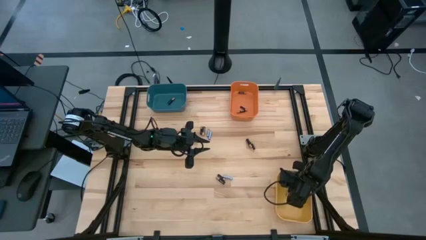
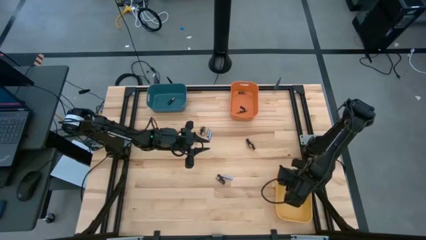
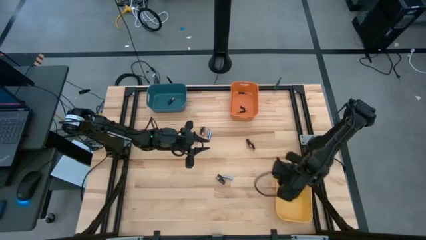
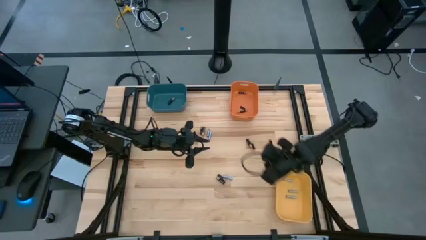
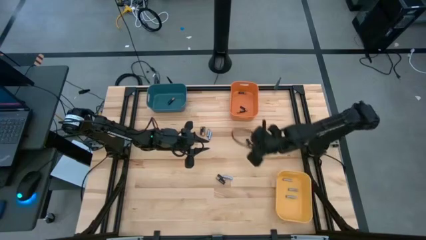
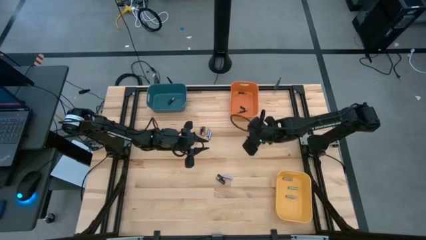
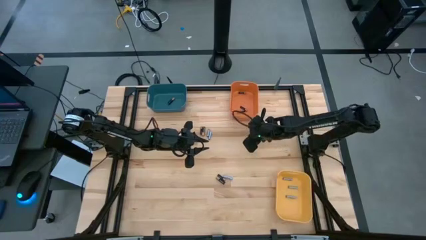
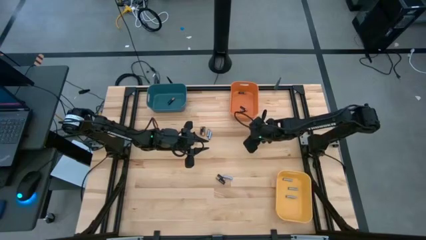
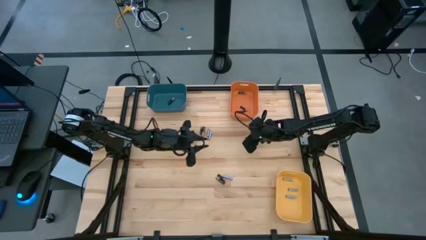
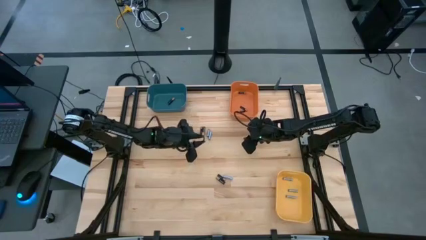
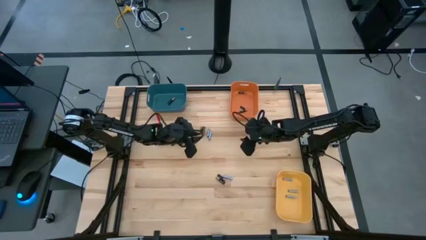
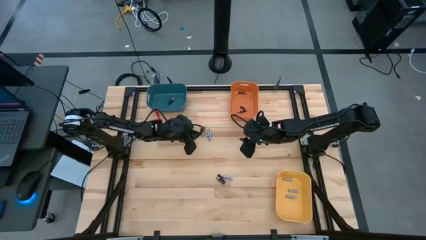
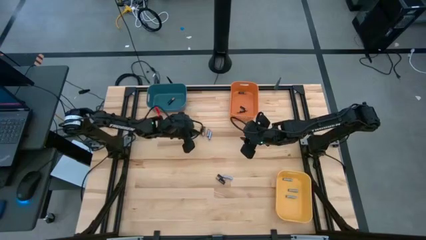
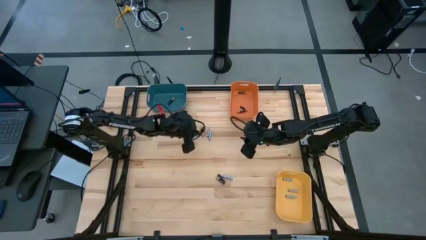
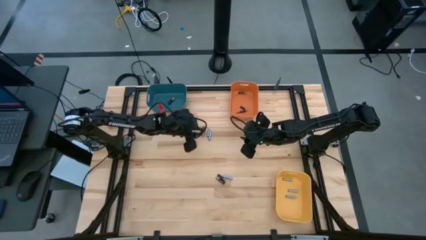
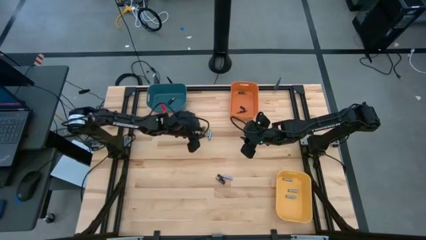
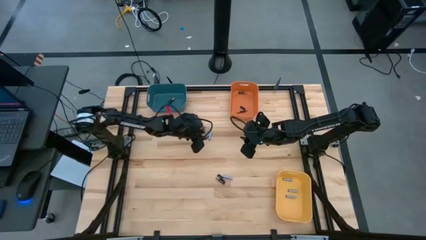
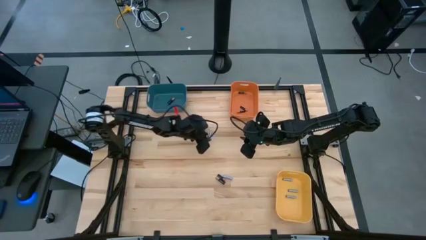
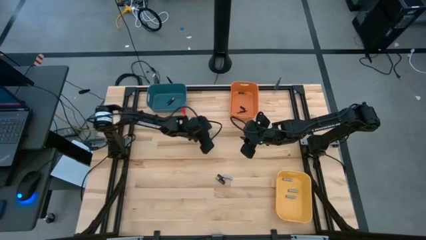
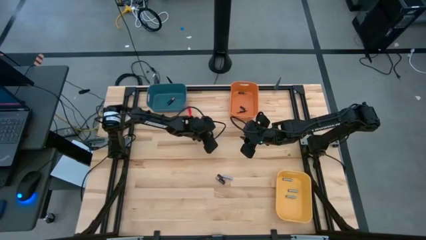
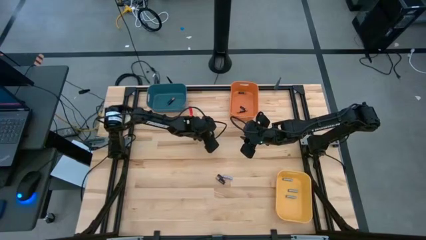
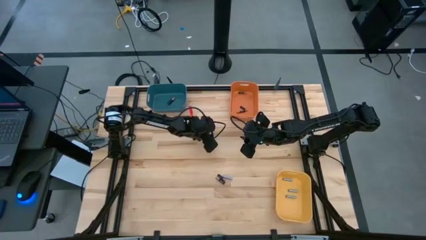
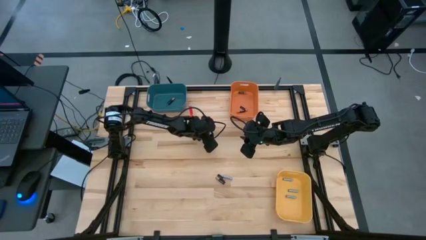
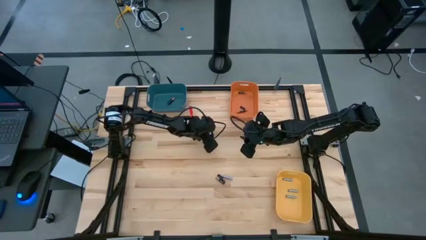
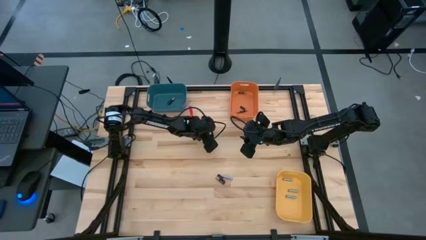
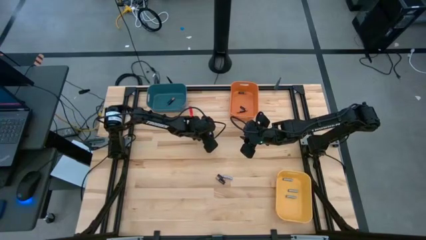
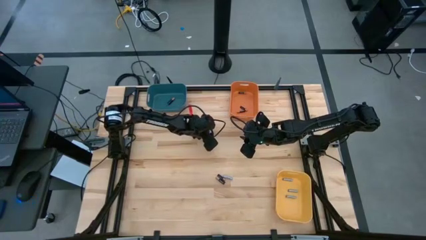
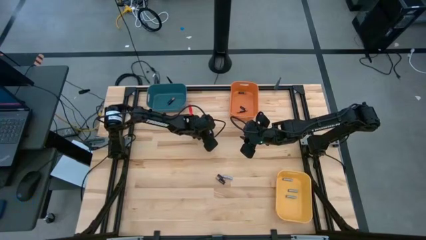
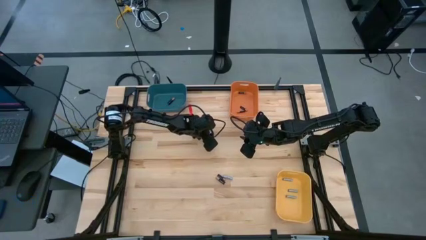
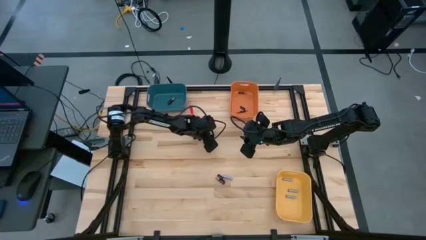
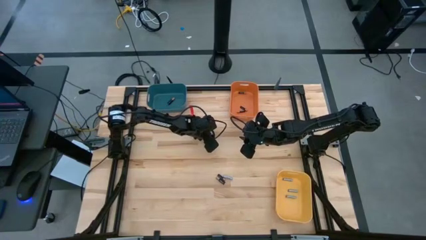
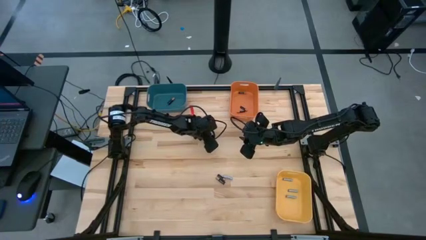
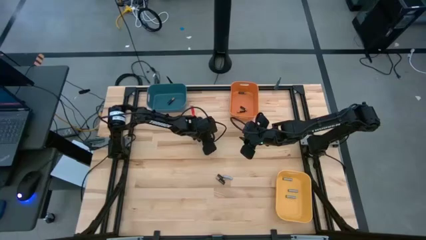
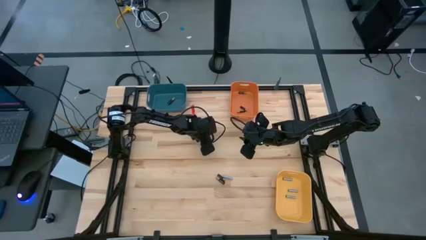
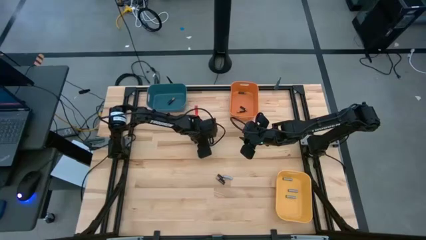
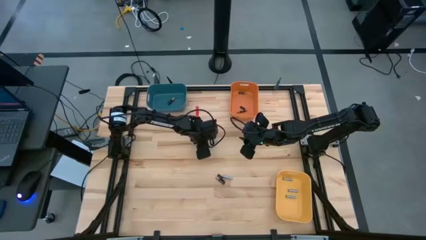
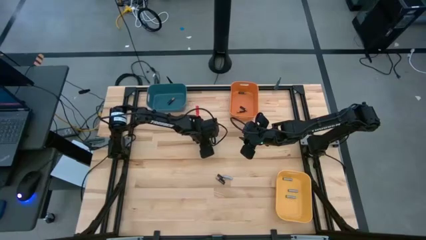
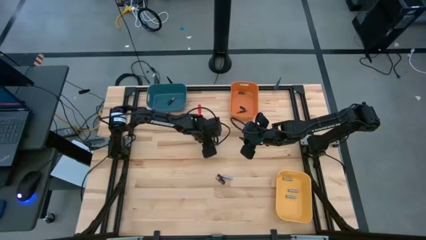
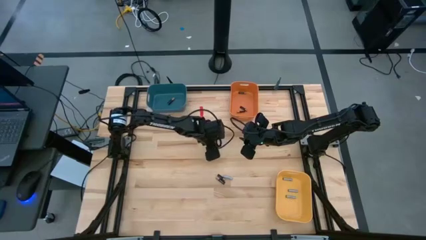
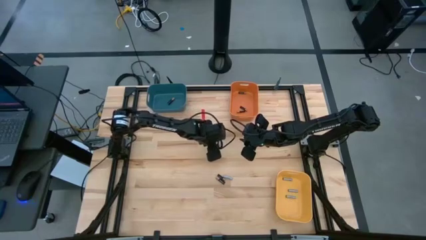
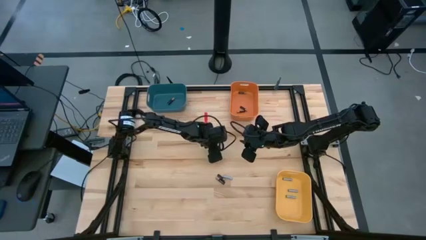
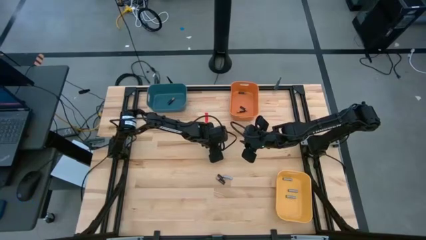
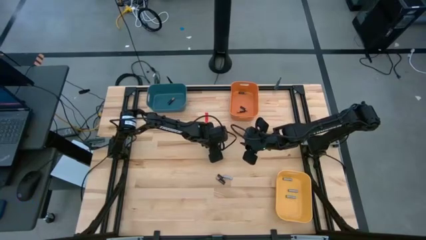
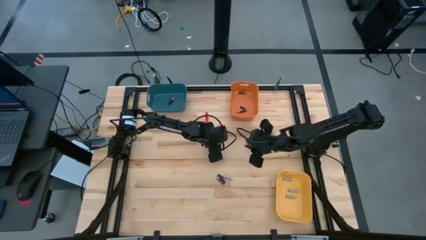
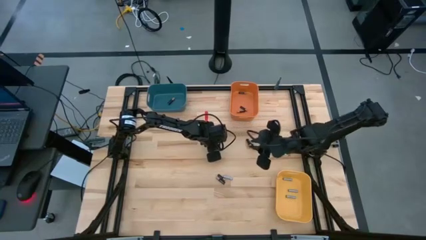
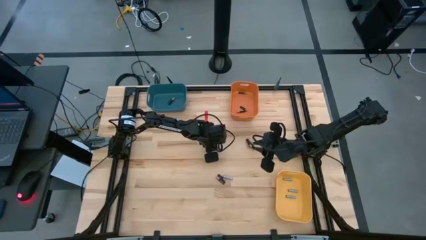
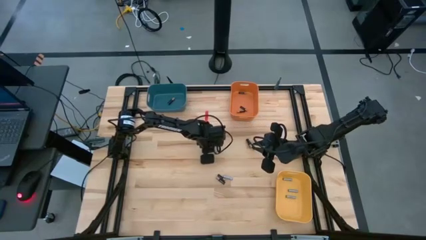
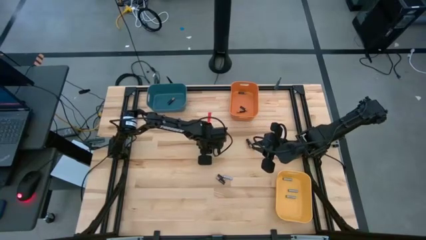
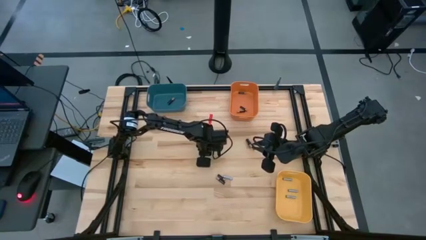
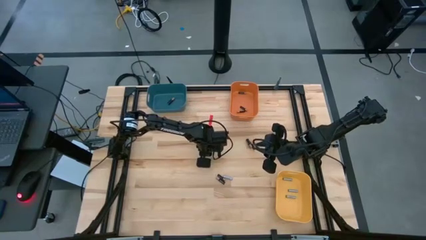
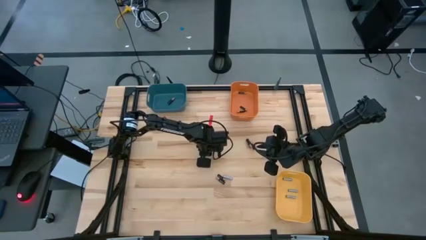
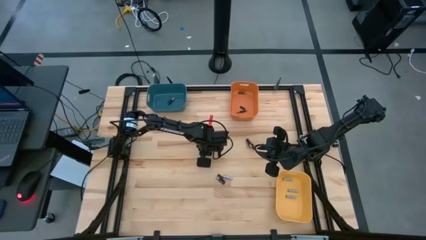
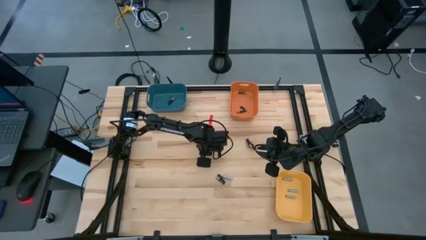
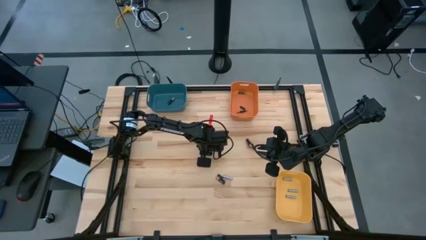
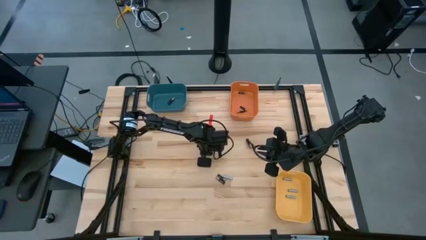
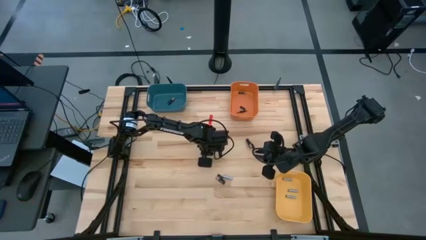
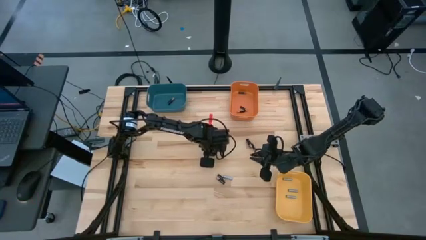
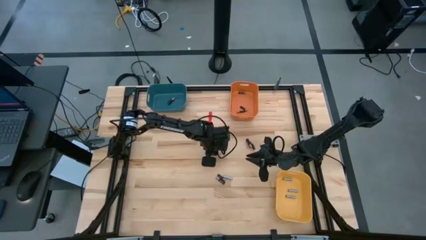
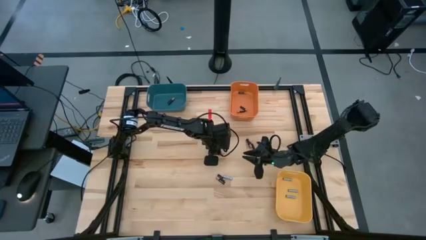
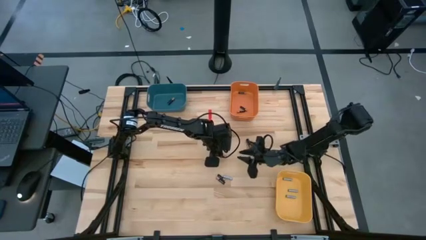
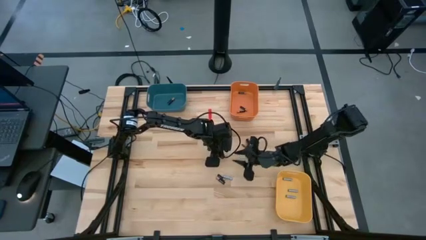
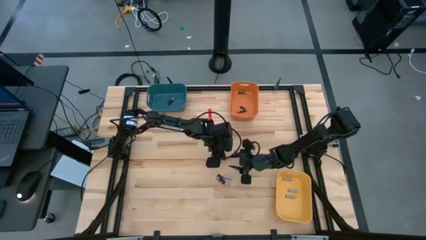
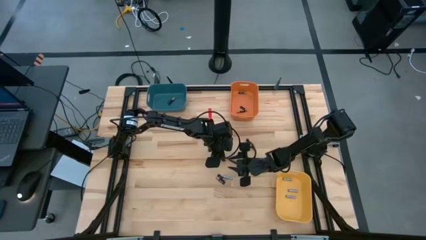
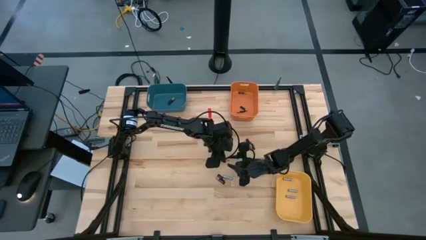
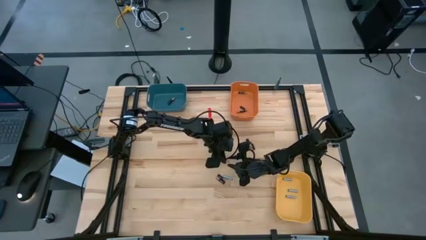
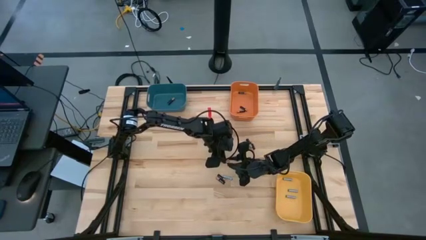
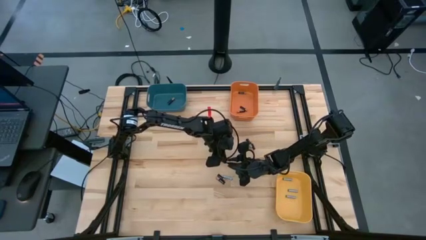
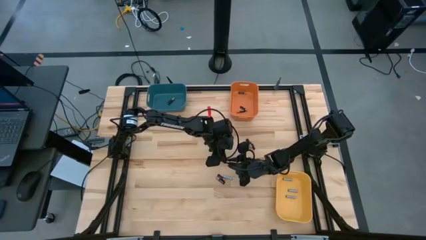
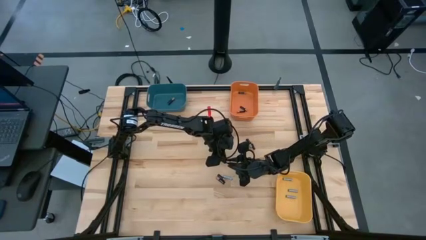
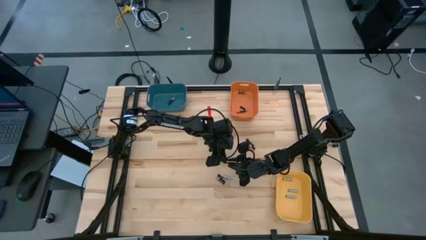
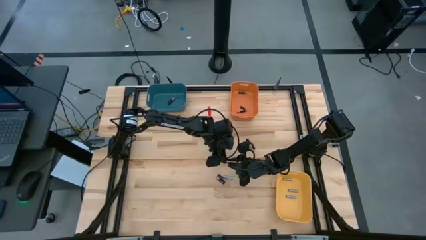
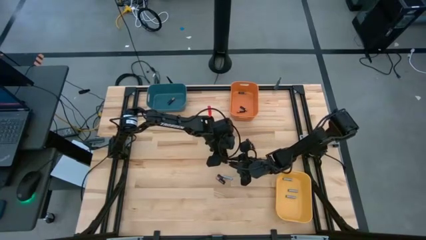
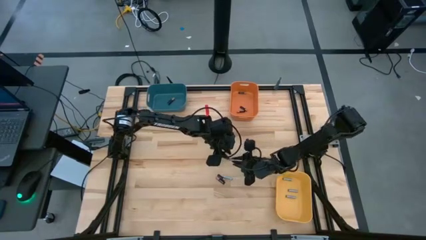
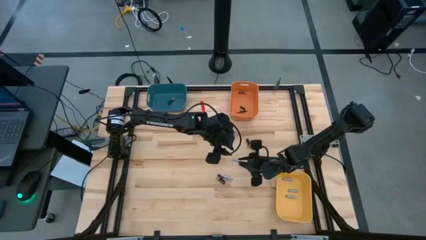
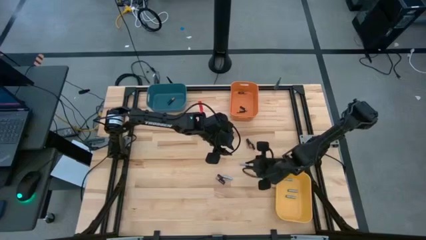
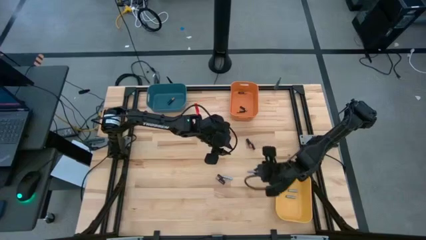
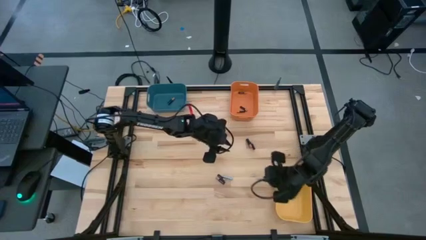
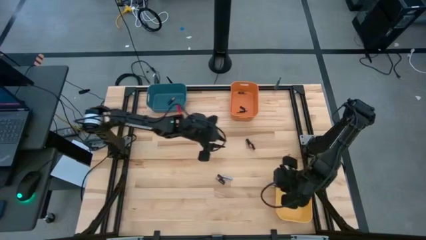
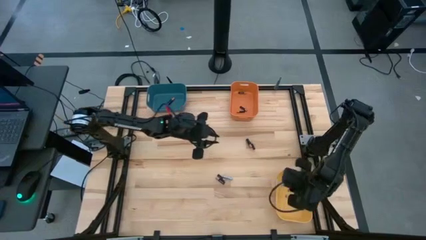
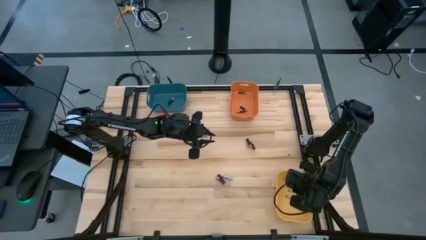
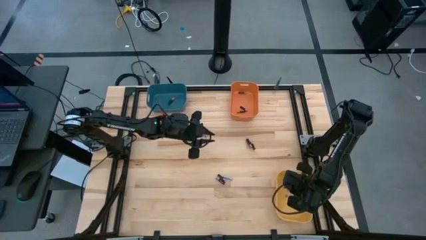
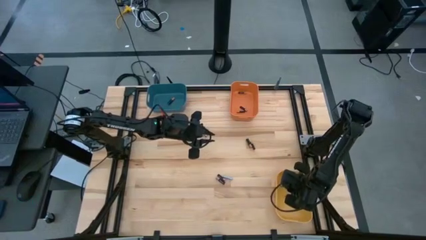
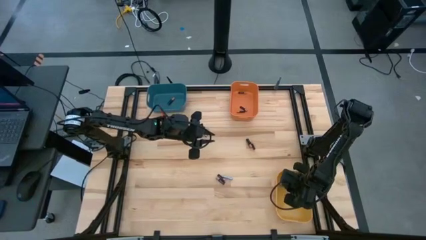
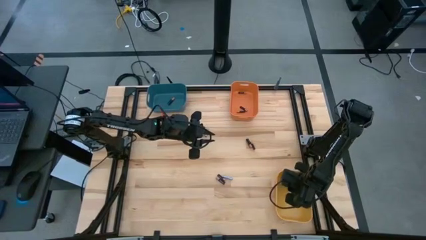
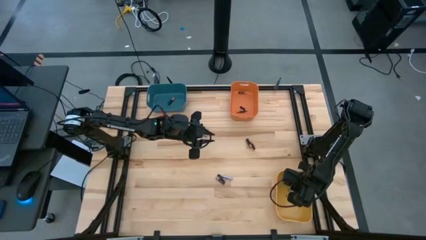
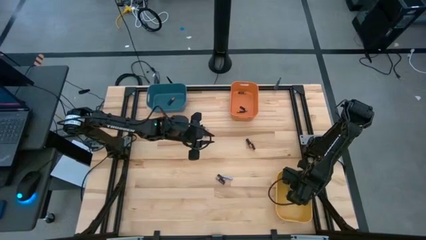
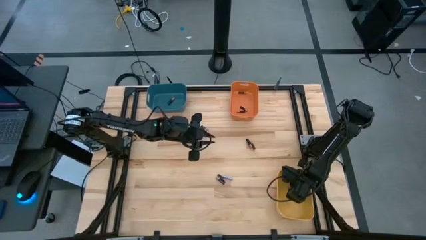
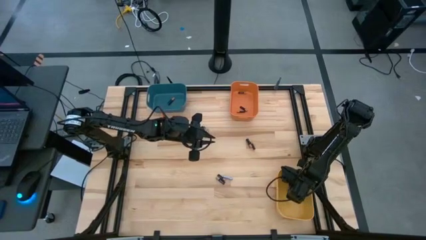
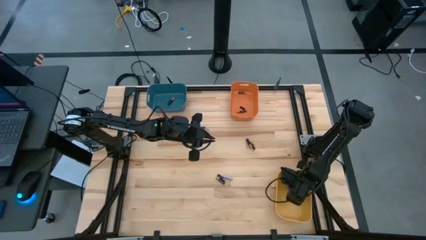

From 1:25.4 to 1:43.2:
Task: Sort batteries
Put the silver battery into the yellow bin
